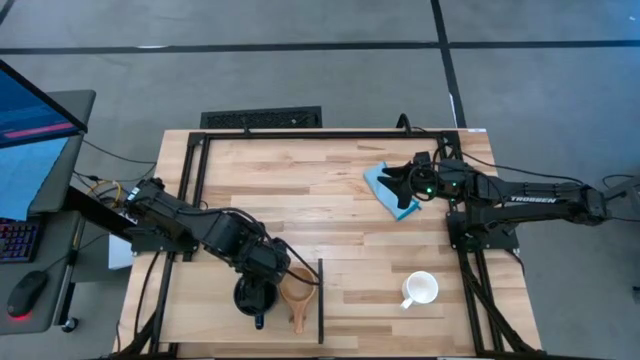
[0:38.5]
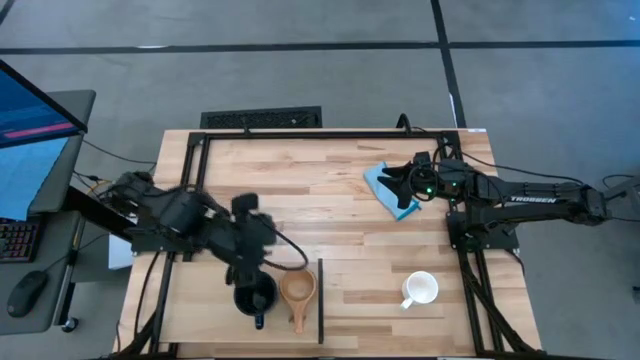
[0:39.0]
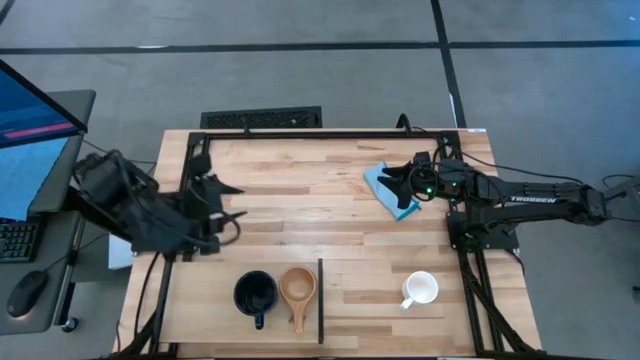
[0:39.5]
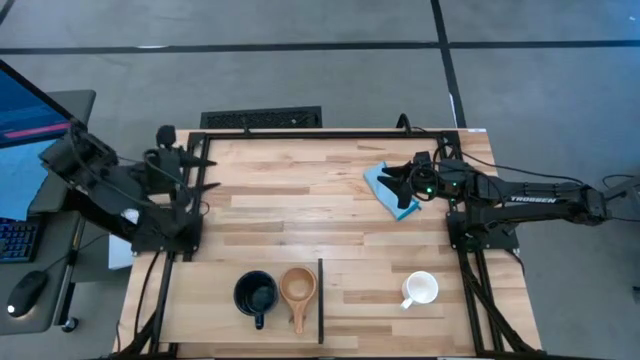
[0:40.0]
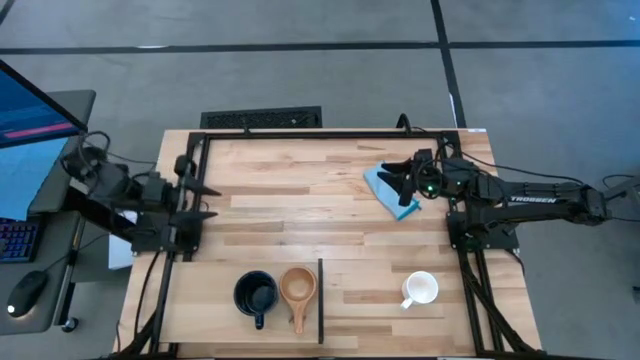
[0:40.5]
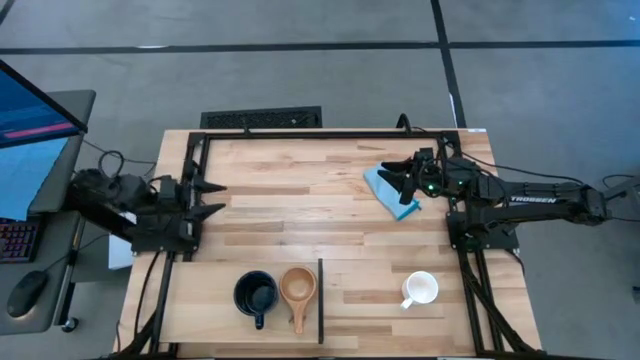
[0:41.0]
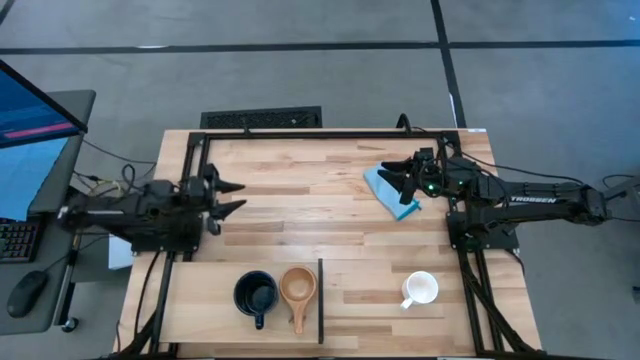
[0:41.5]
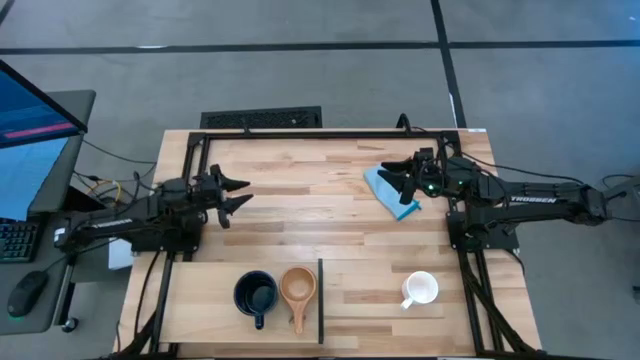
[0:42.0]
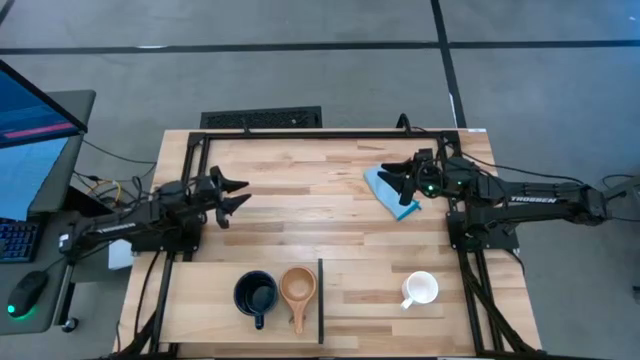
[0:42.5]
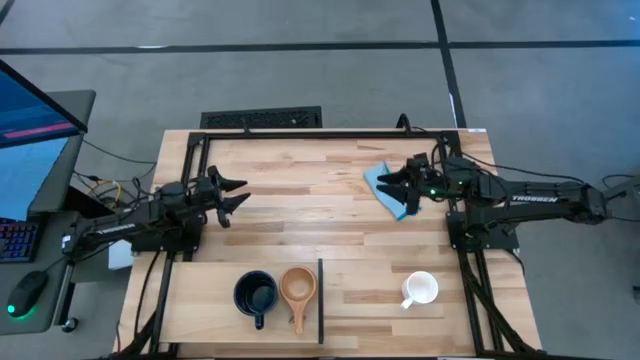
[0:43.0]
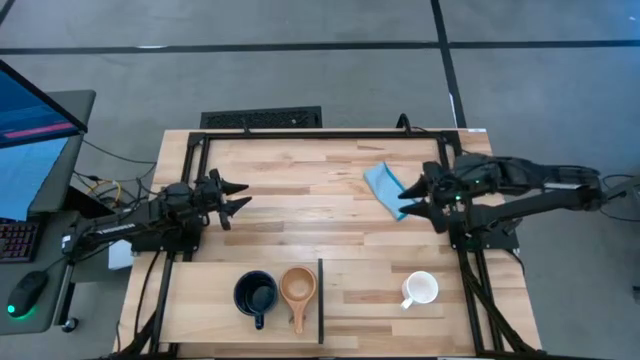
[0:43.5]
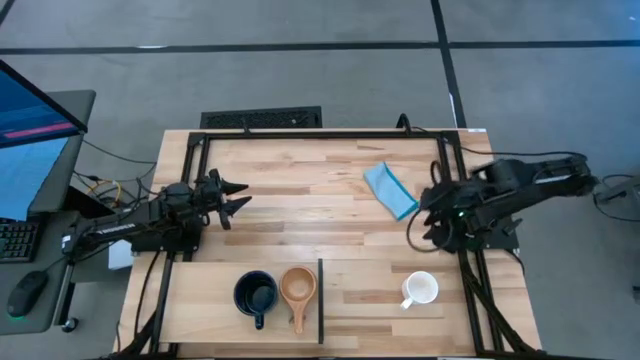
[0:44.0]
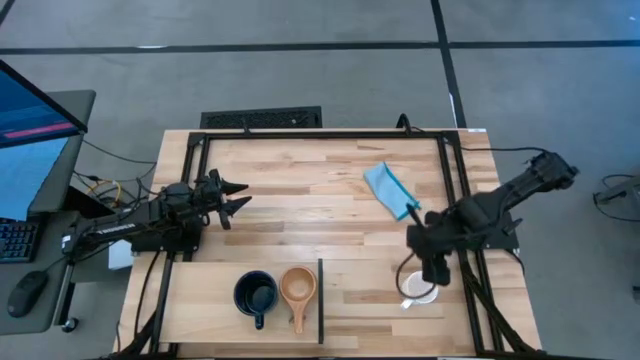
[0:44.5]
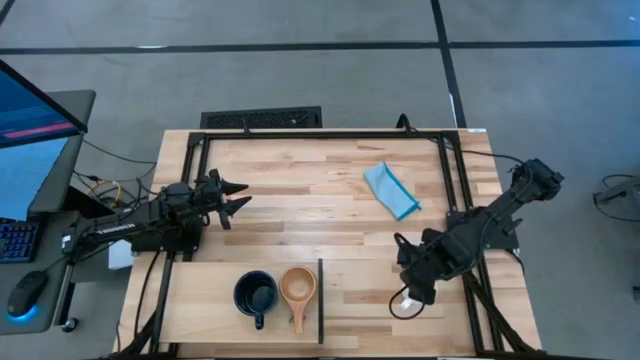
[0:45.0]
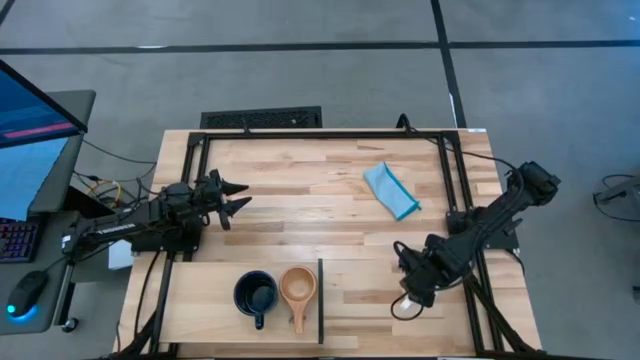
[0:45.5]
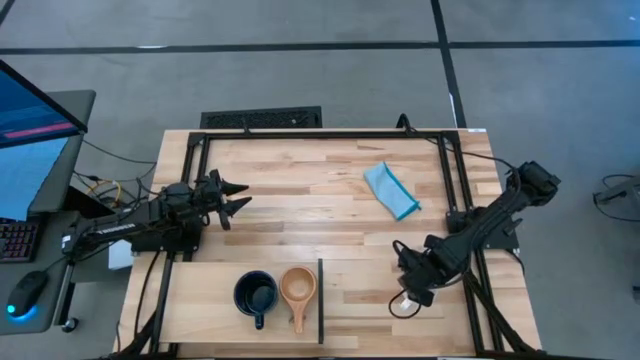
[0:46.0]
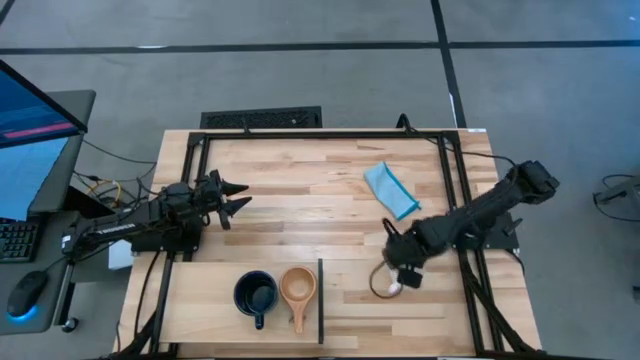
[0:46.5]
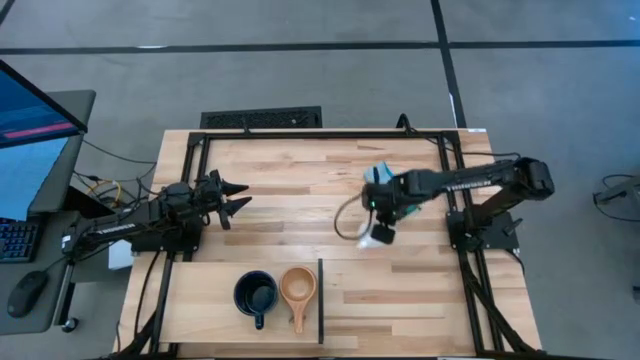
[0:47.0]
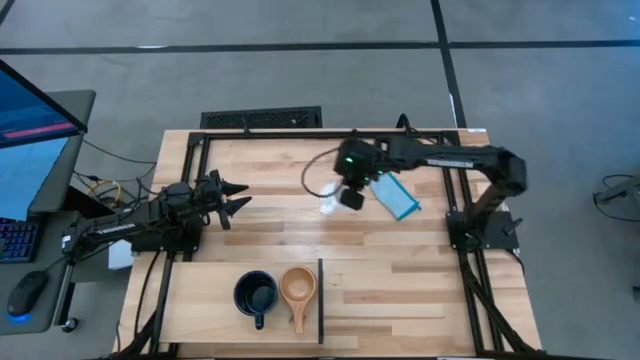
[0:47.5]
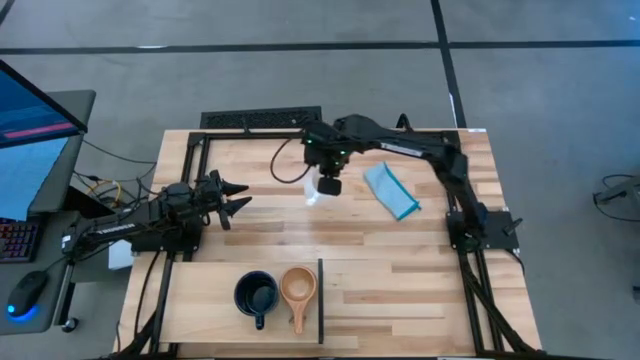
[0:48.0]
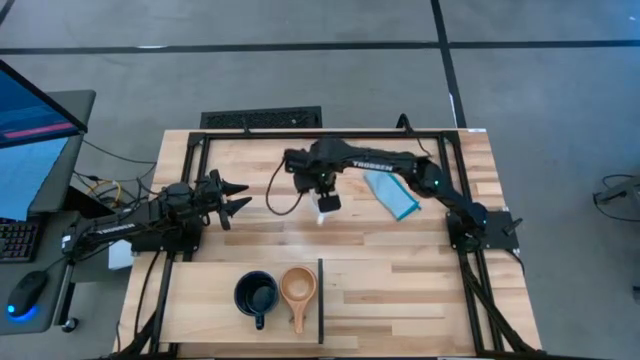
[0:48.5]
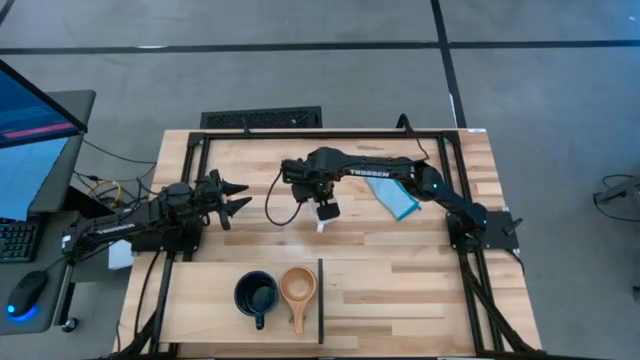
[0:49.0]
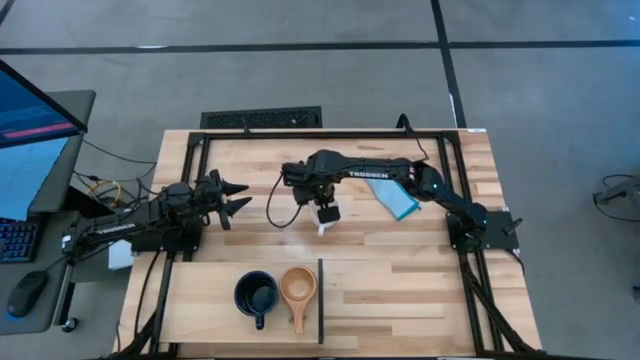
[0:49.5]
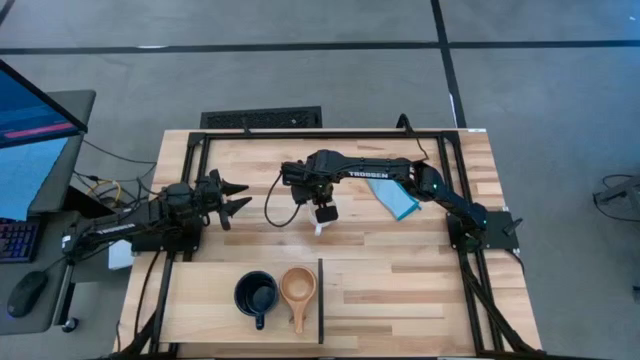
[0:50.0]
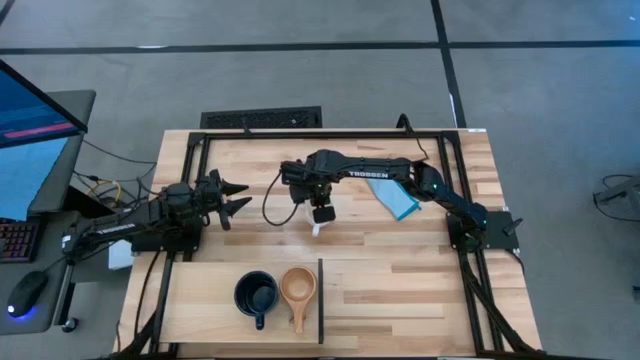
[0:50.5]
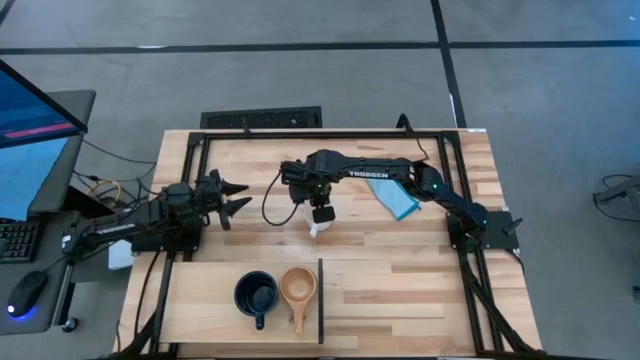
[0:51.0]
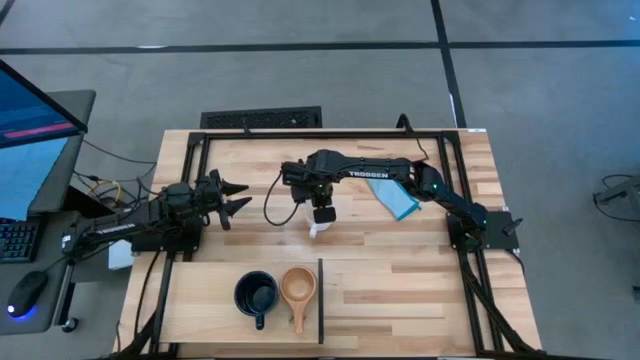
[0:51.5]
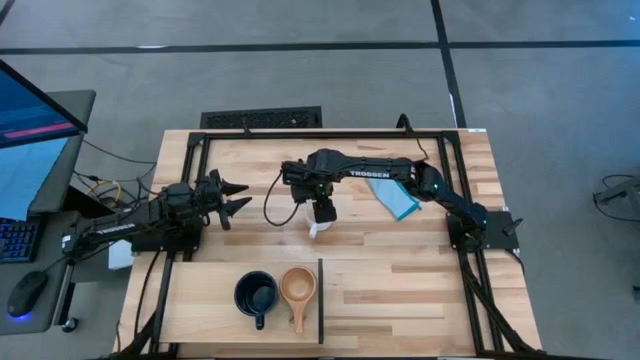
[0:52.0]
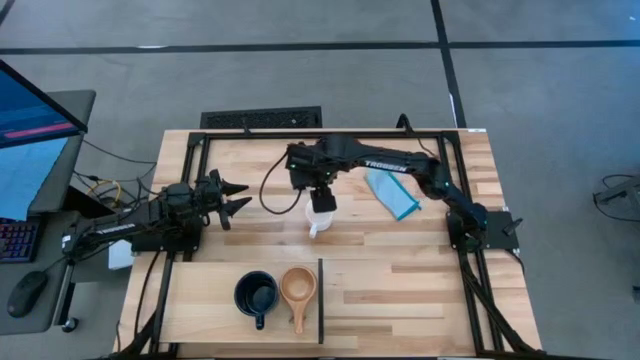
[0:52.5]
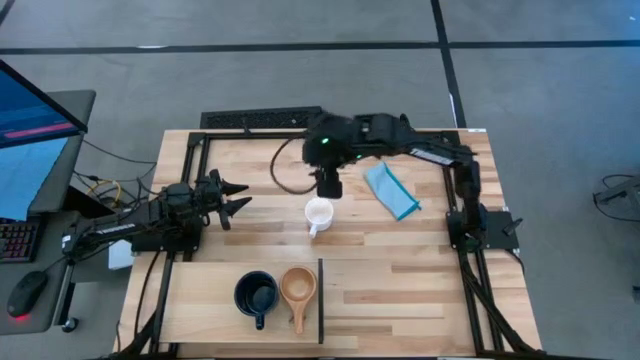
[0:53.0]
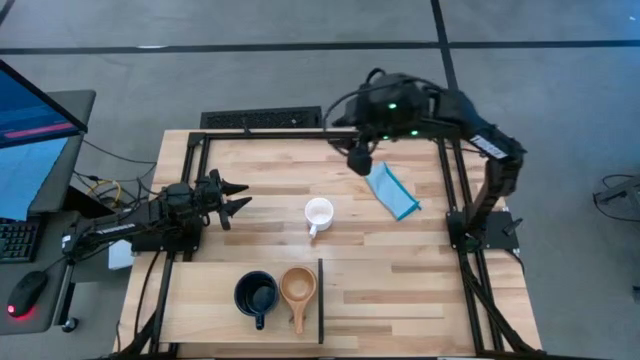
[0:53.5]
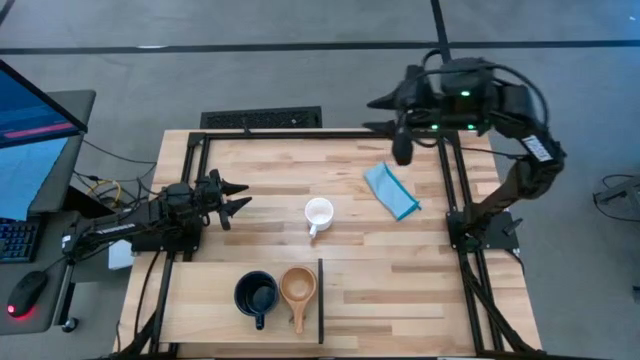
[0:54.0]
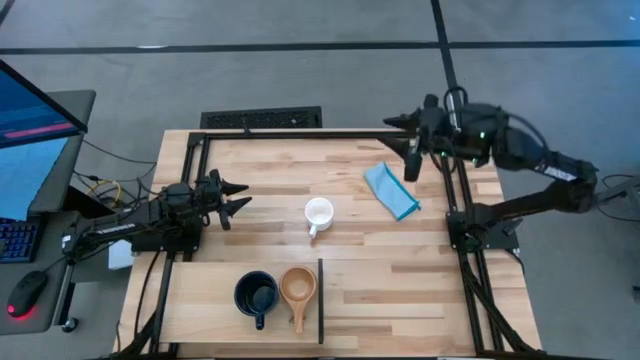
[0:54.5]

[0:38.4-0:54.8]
Task: Stack small to large cups/mugs on shelf
Put the white mug on the shelf

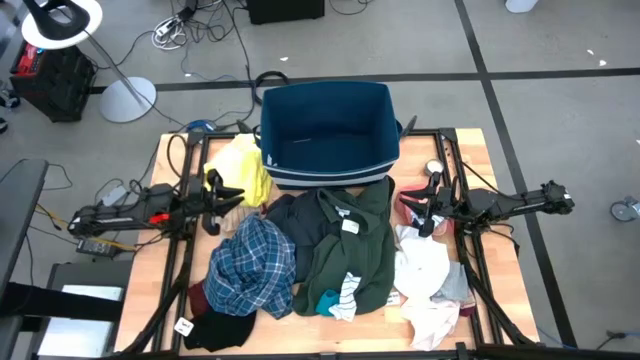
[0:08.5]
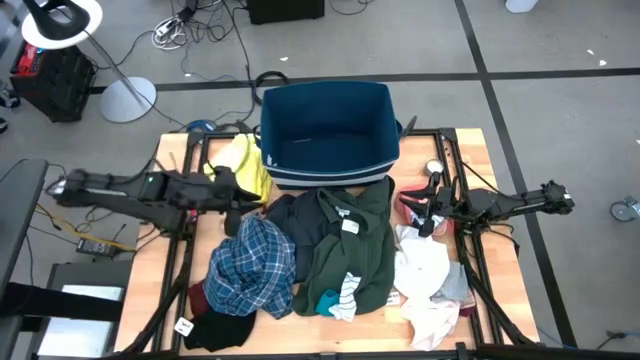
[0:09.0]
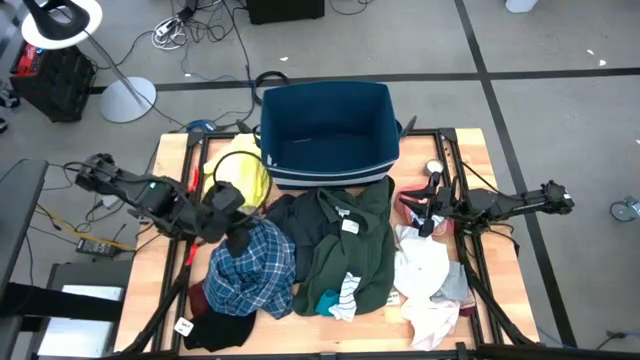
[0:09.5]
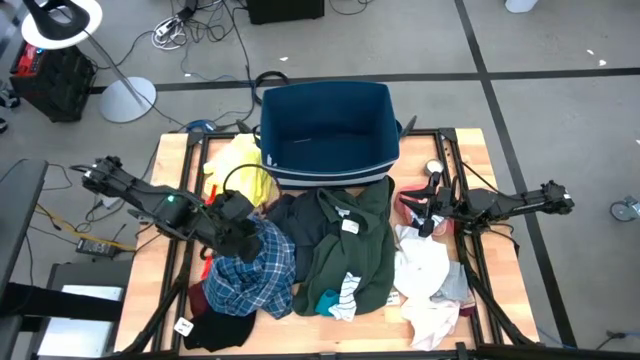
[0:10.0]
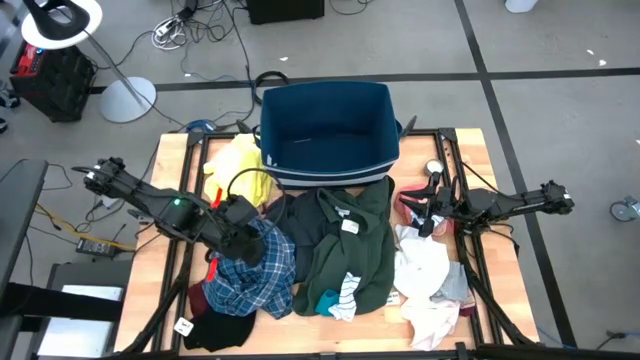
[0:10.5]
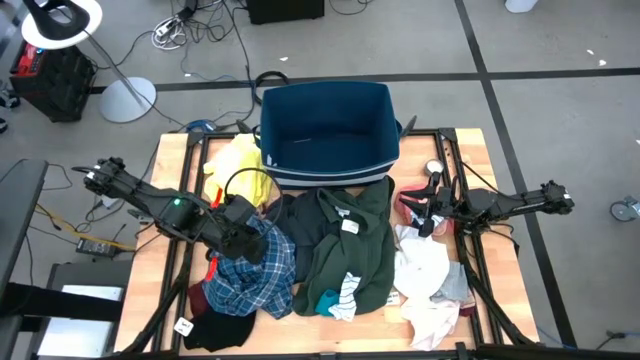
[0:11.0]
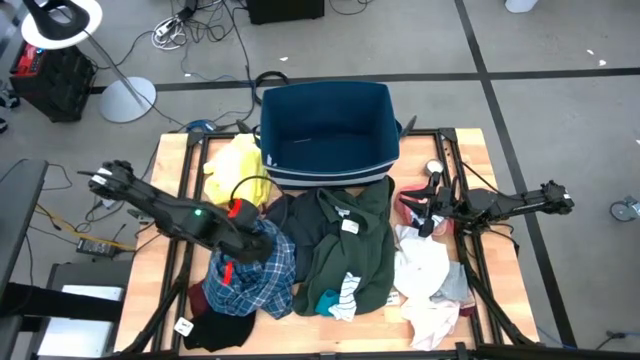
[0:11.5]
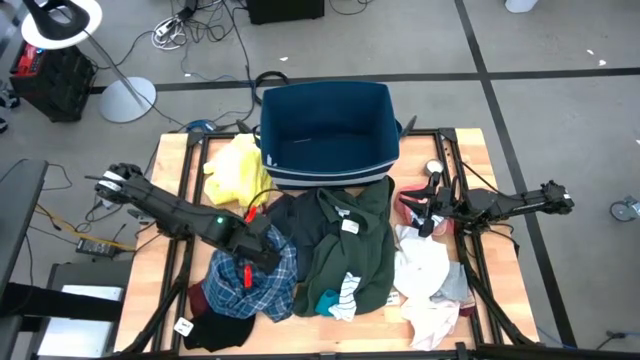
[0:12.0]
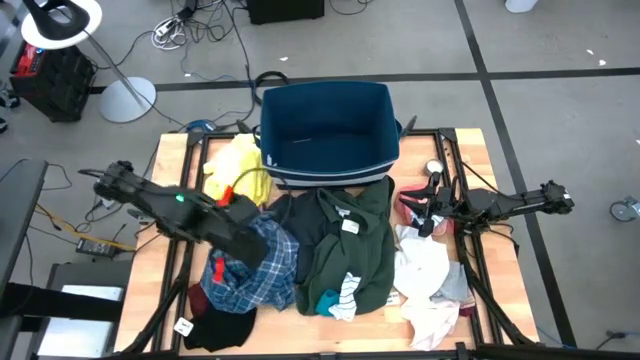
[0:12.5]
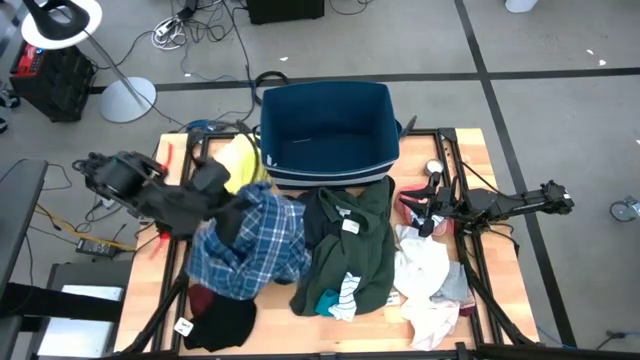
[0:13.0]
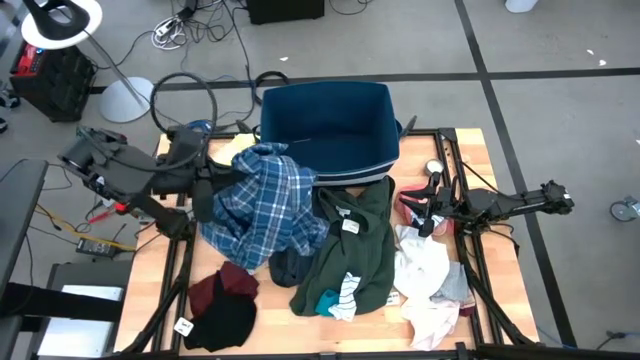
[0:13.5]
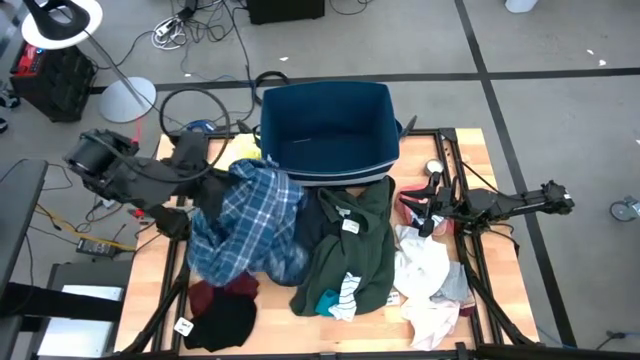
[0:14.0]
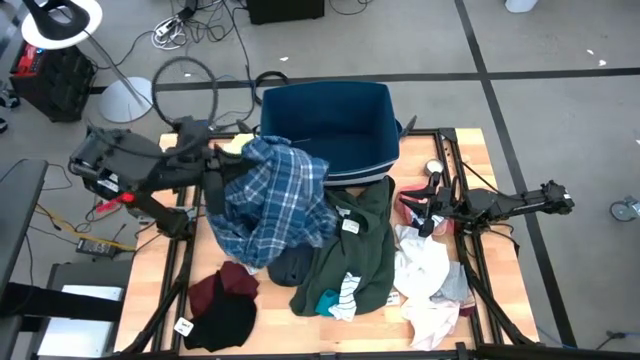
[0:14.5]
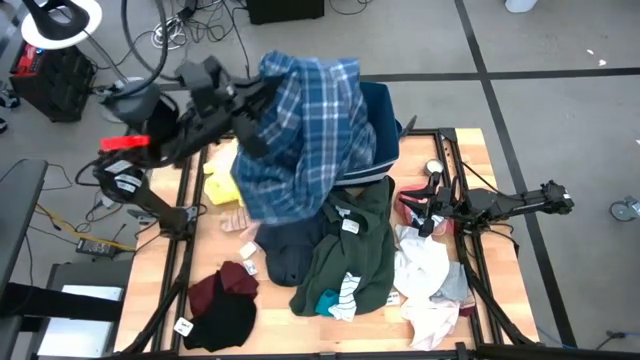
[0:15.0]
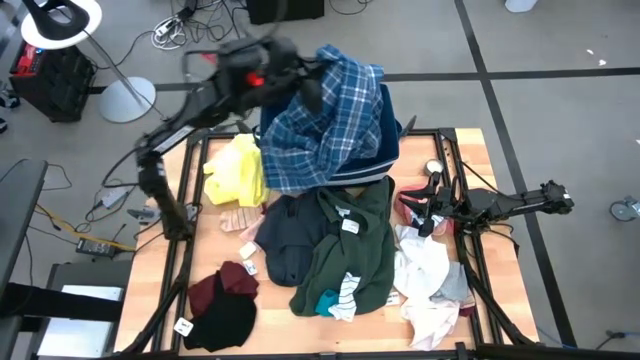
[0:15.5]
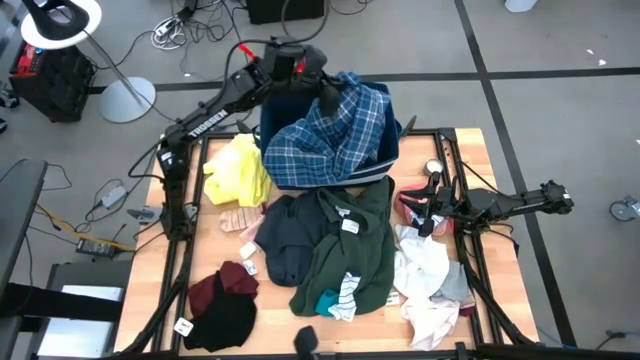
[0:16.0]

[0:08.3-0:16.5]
Task: Sort clothes
Put the blue longsleeve checkered shirt into the blue laundry bin
